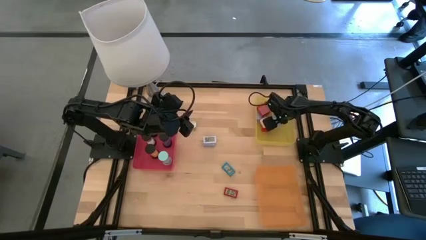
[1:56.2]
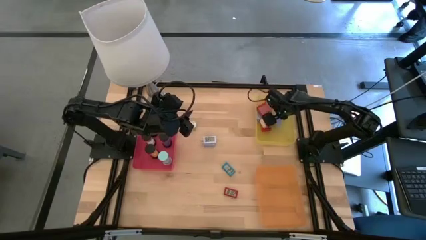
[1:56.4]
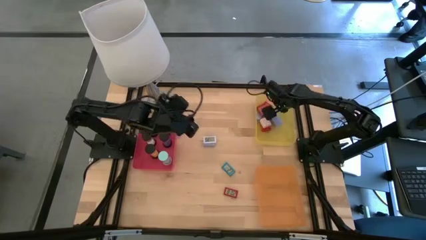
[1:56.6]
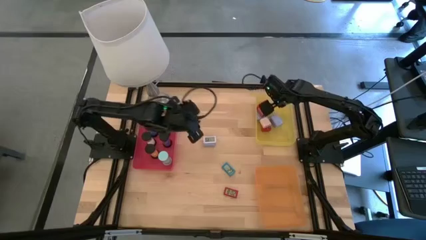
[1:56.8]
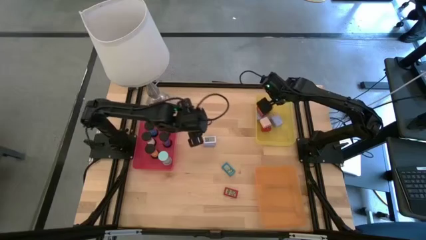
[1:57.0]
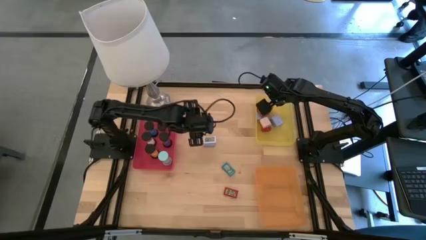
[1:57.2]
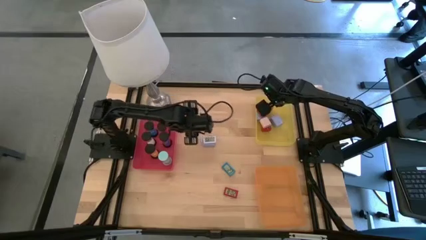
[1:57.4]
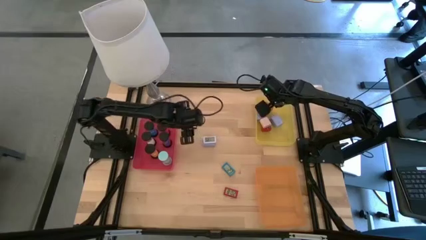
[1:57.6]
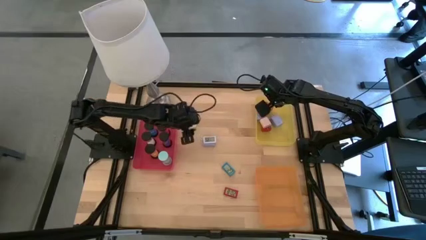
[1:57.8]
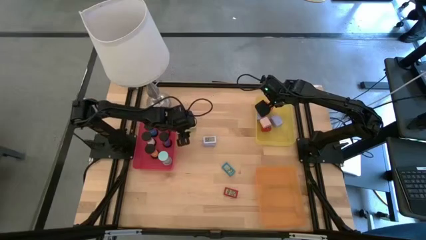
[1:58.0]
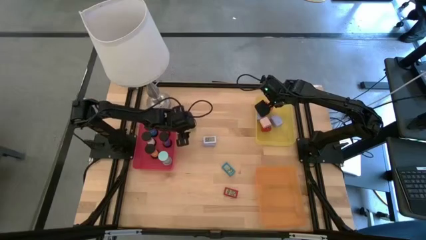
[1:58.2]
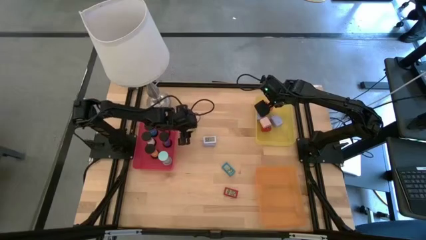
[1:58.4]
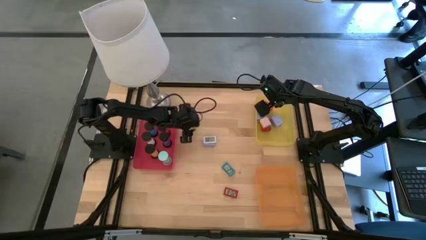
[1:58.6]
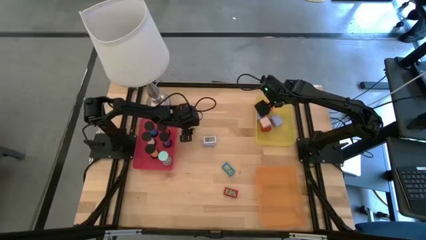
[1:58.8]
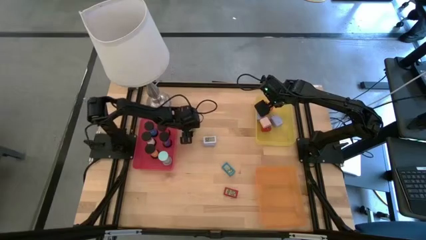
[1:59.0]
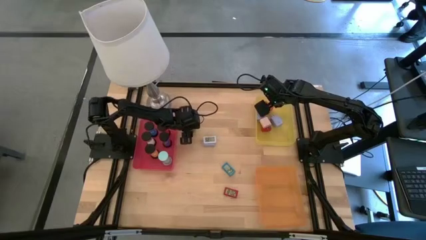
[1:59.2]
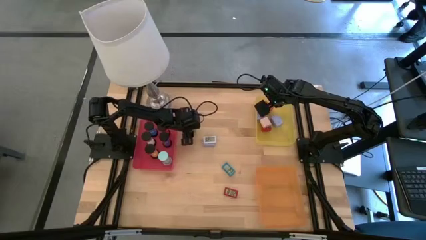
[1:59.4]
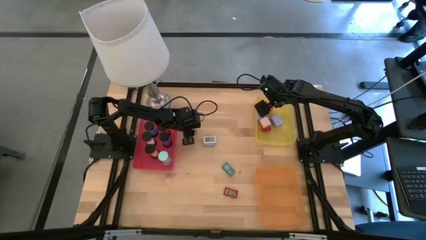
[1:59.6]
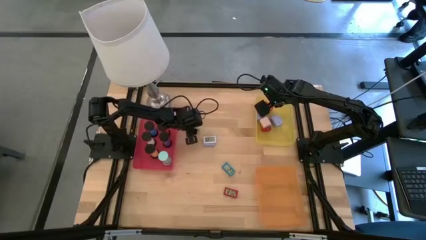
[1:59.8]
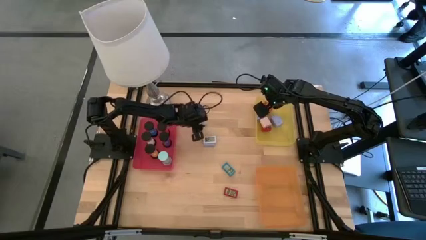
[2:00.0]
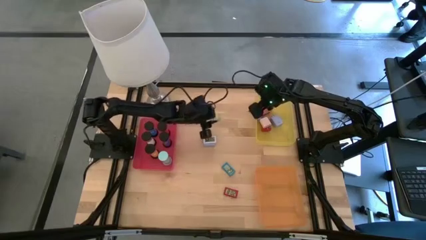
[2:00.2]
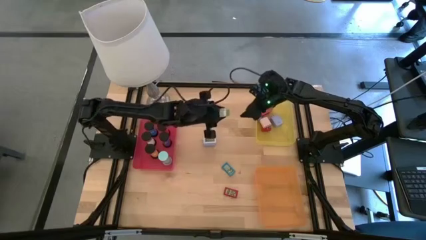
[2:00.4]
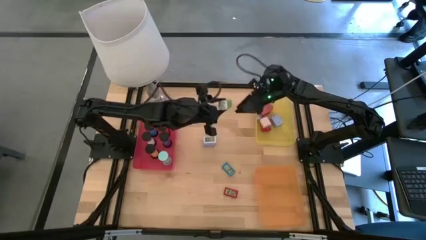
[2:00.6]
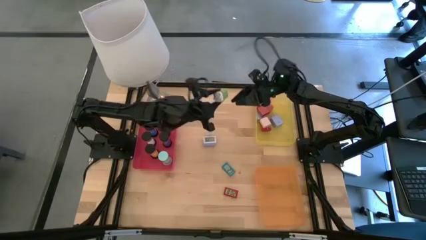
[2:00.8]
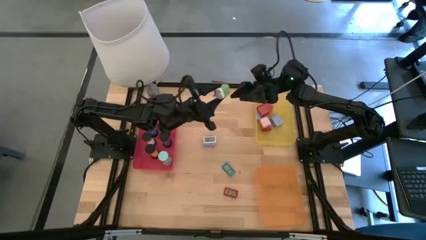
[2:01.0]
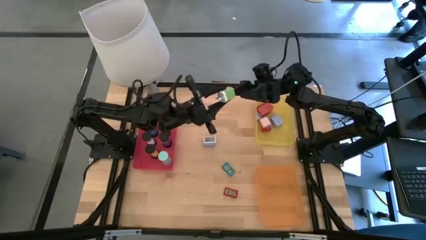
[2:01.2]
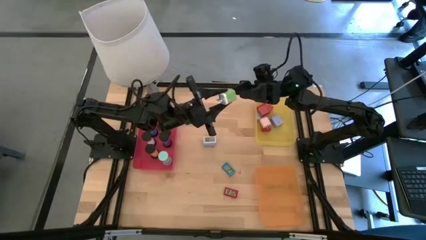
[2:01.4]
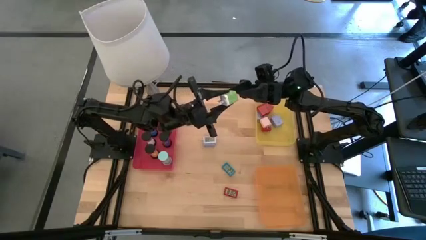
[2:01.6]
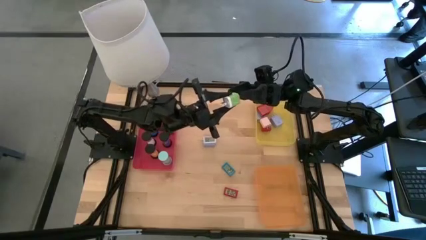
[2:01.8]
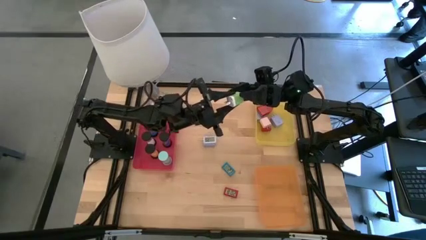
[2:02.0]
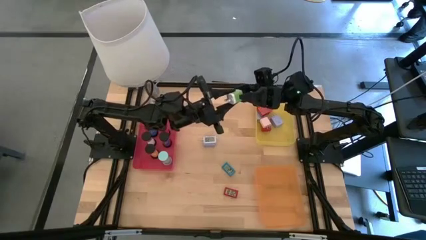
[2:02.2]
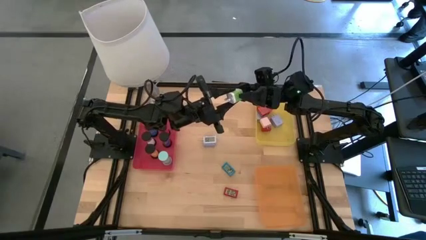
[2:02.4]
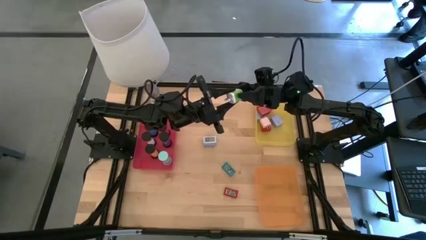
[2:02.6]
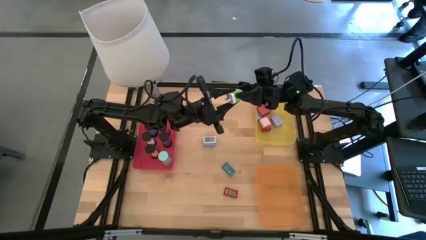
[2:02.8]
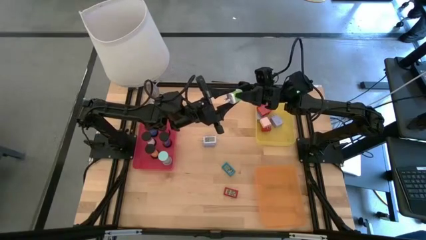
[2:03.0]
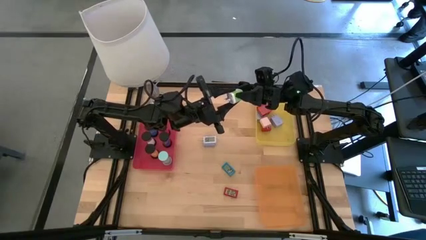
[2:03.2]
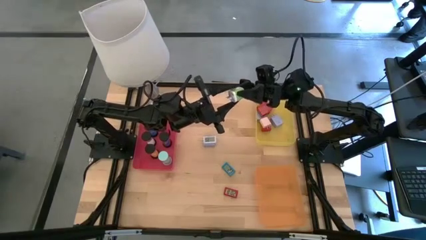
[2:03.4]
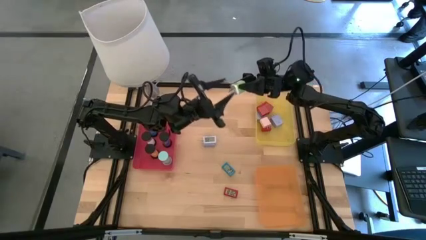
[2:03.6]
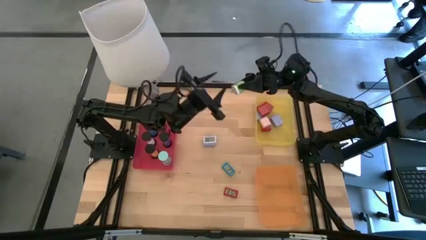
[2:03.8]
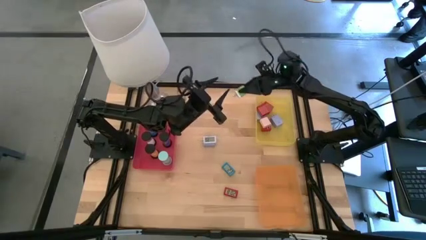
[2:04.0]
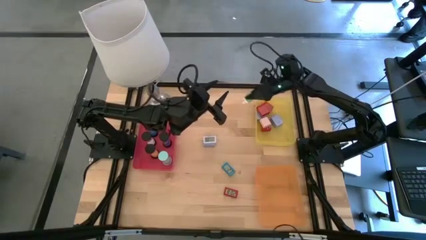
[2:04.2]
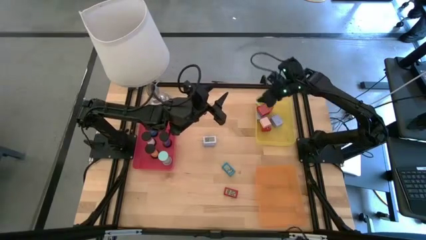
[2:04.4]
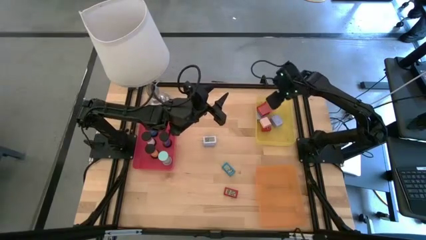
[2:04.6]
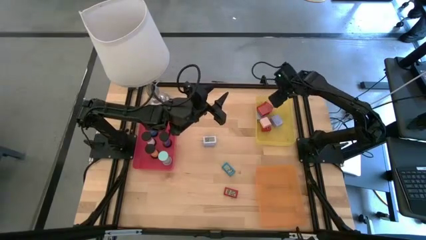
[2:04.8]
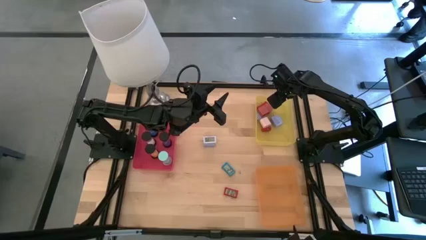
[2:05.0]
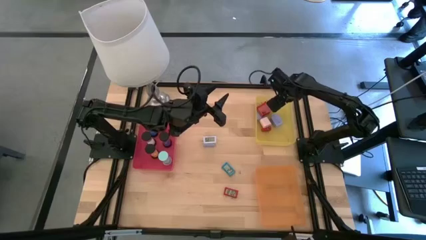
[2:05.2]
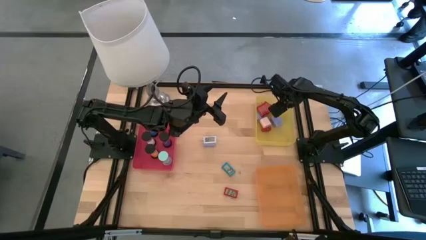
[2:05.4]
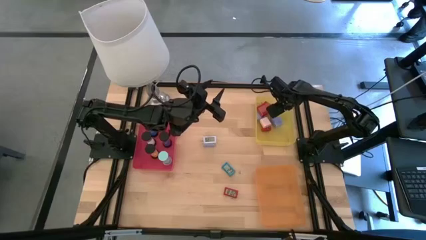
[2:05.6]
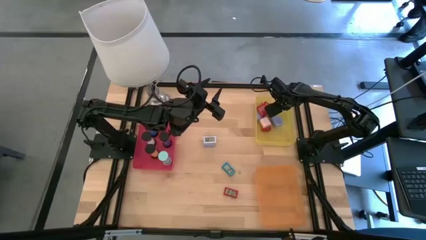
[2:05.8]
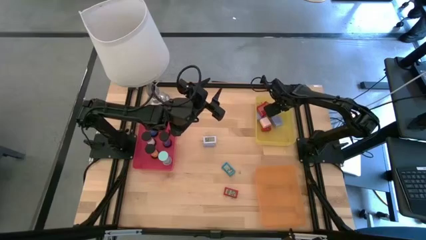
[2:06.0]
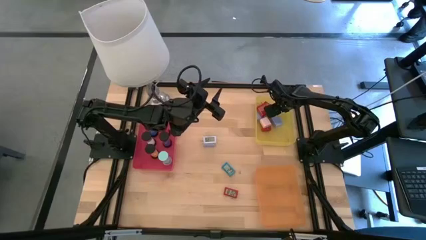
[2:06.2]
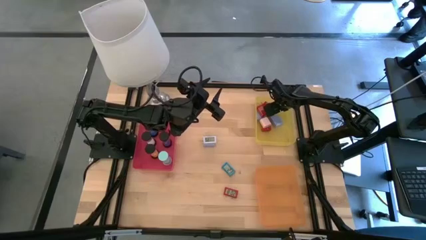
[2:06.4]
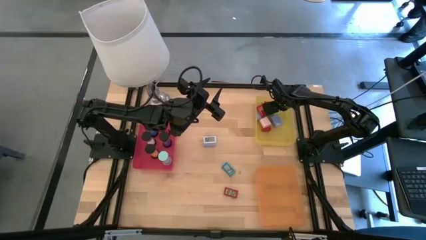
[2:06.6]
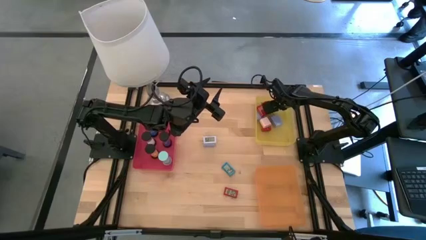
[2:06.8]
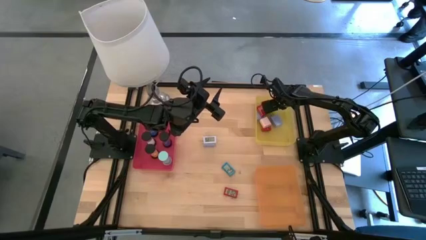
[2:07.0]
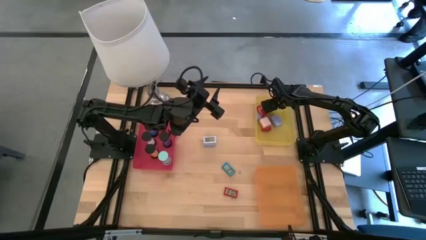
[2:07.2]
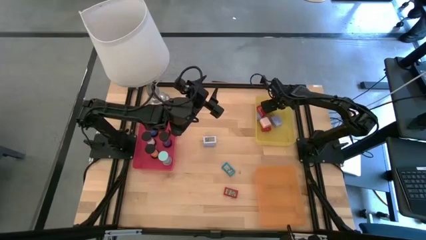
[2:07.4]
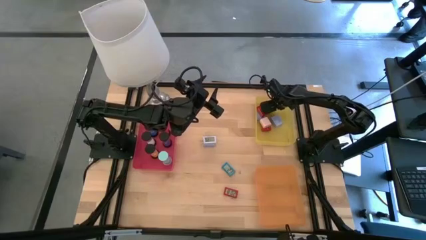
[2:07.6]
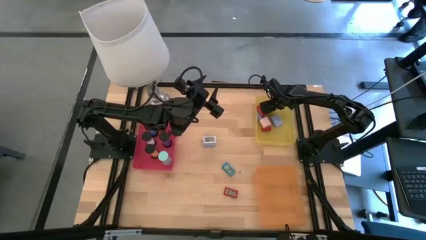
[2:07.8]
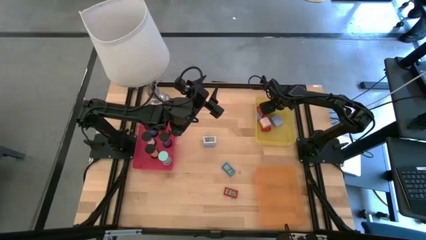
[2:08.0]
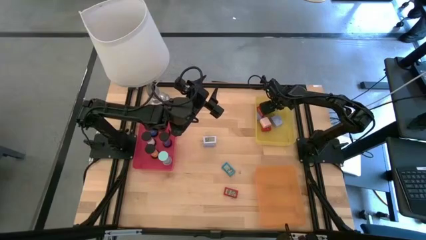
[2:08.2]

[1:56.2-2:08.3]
Task: Pick & Place Office items
Put the green charger adapter into the yellow bin
